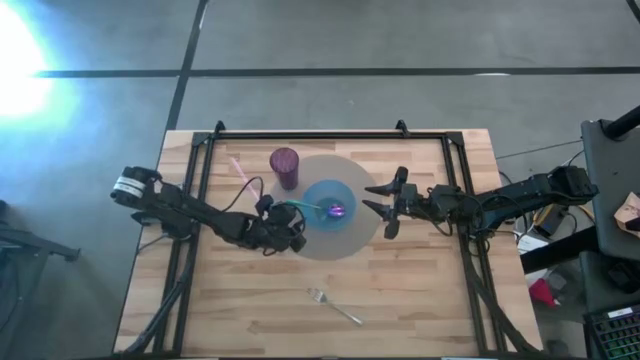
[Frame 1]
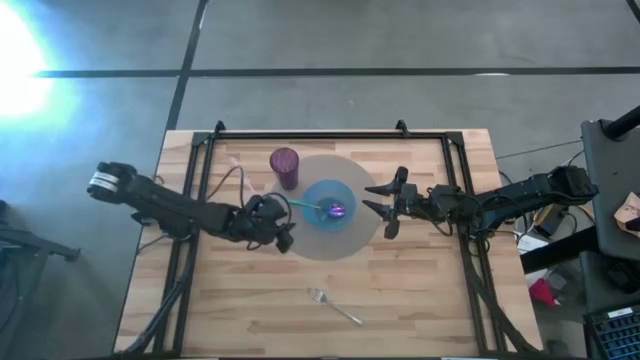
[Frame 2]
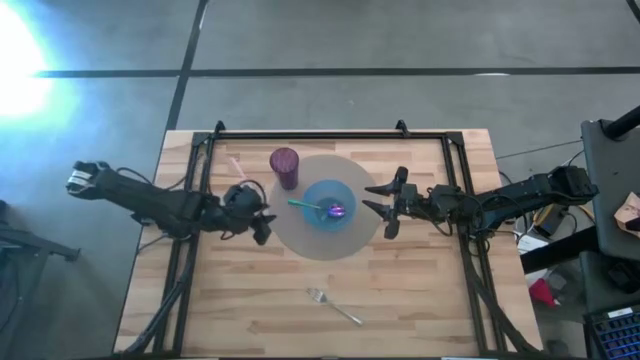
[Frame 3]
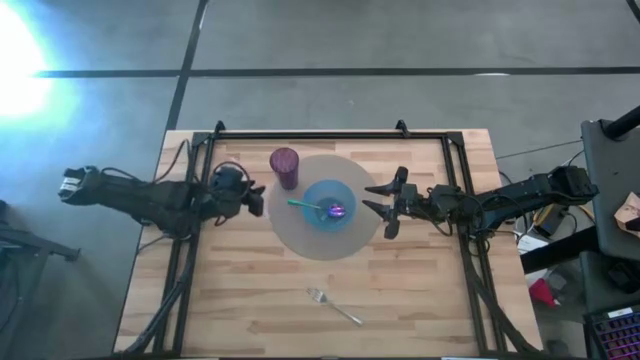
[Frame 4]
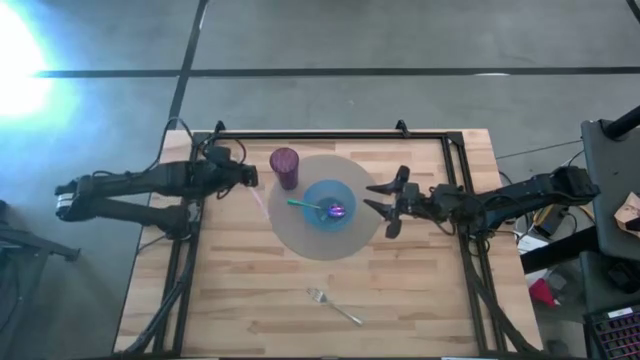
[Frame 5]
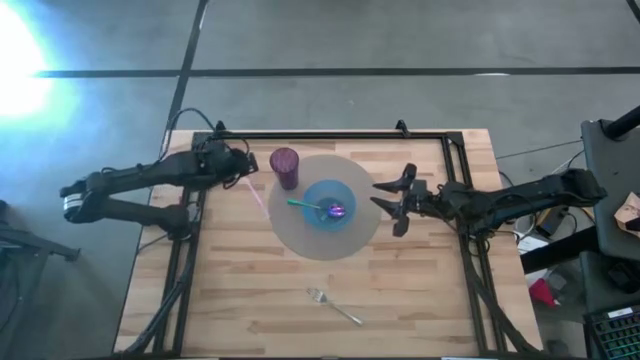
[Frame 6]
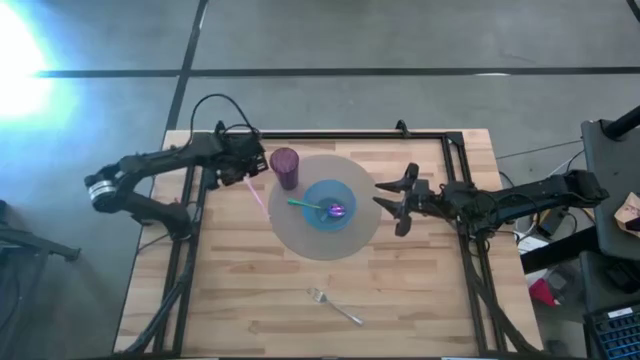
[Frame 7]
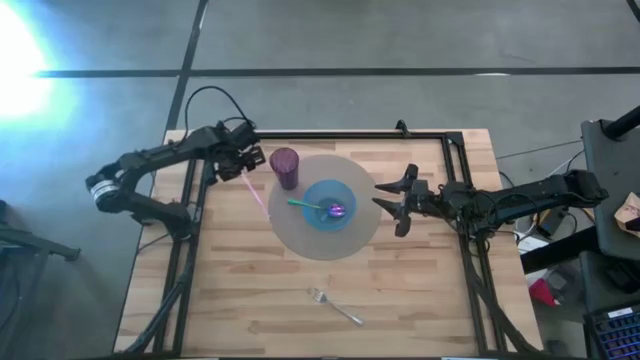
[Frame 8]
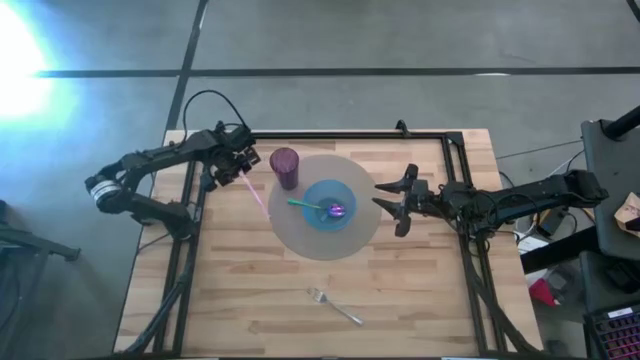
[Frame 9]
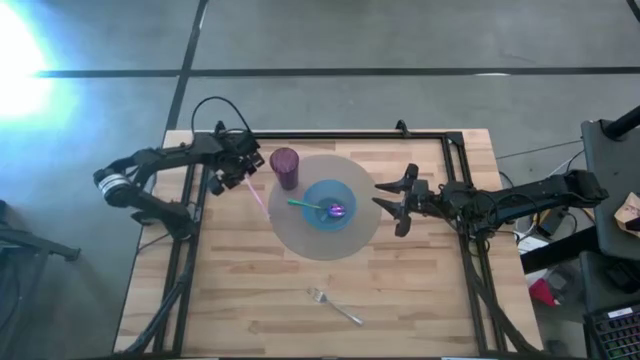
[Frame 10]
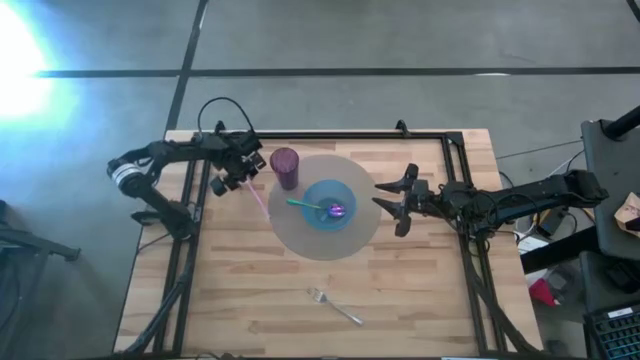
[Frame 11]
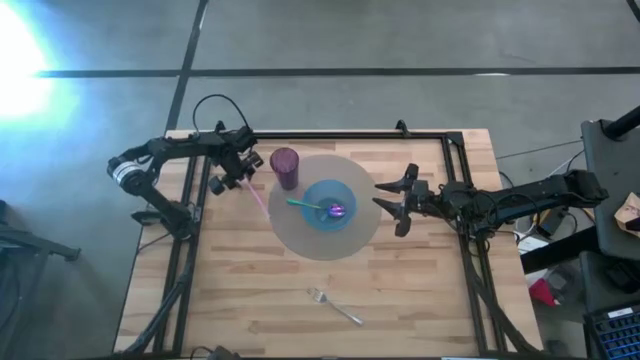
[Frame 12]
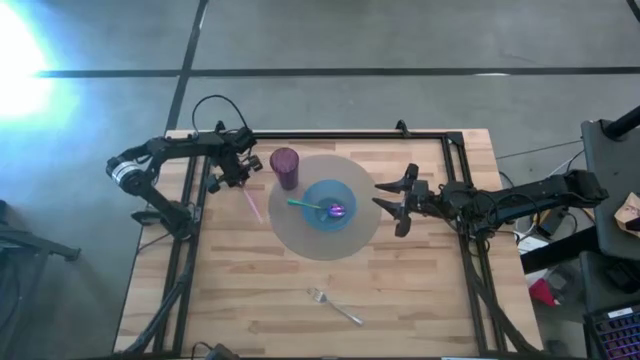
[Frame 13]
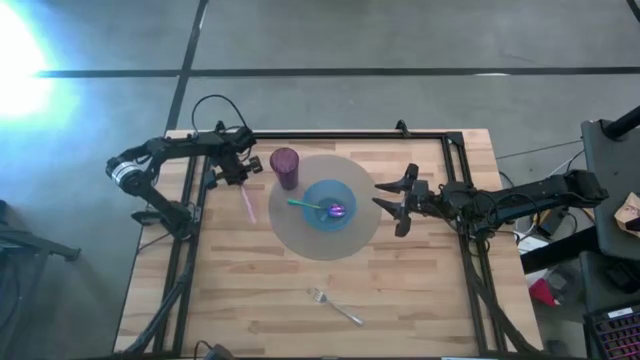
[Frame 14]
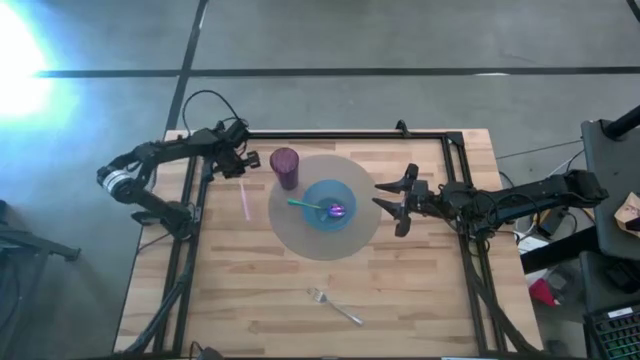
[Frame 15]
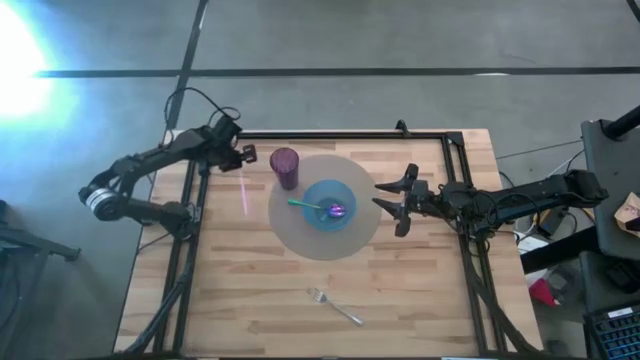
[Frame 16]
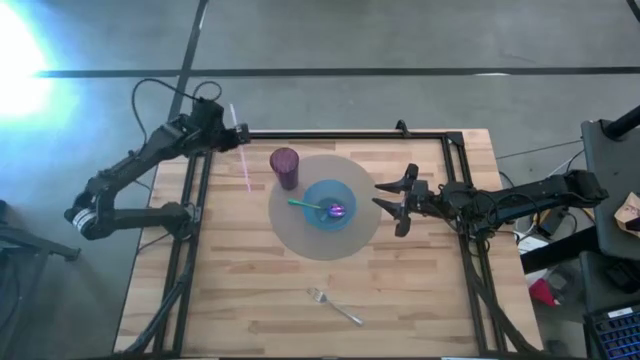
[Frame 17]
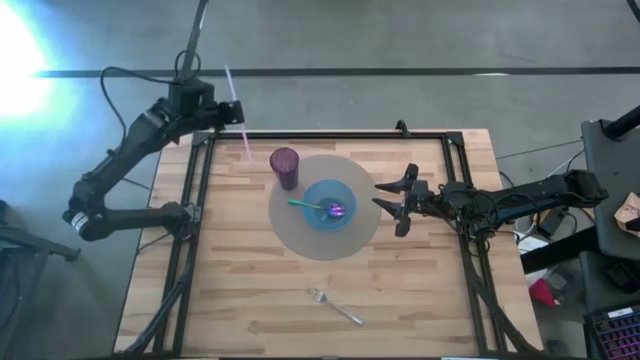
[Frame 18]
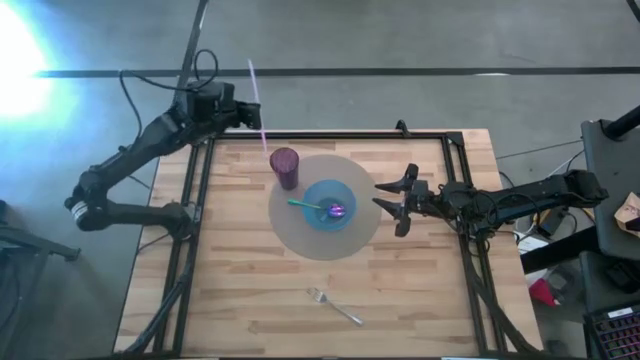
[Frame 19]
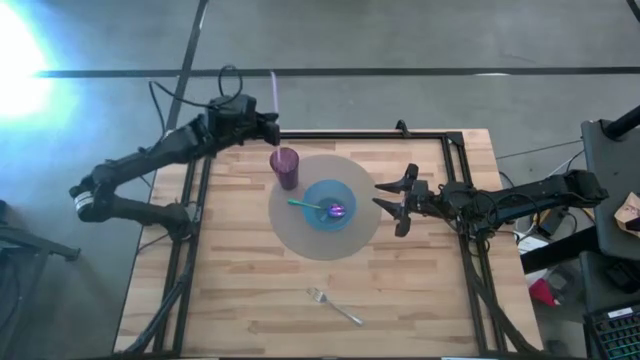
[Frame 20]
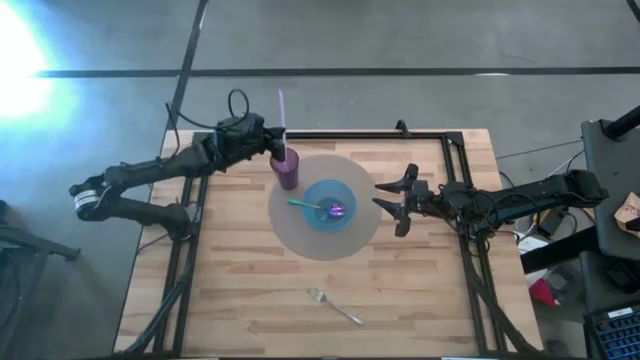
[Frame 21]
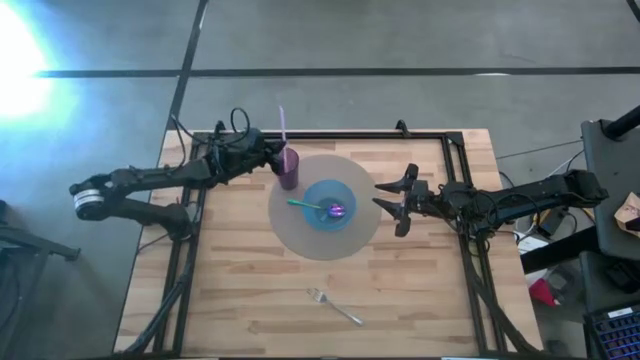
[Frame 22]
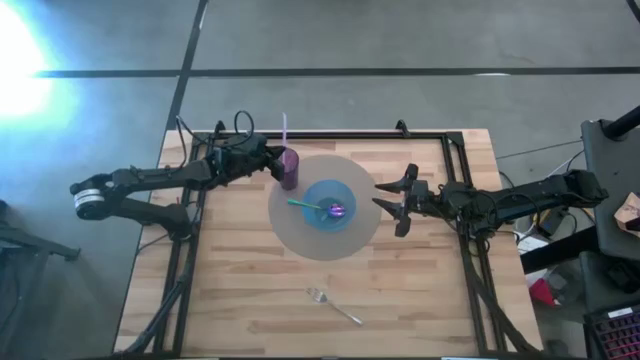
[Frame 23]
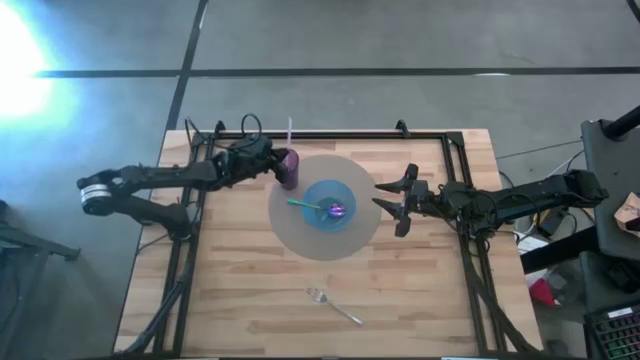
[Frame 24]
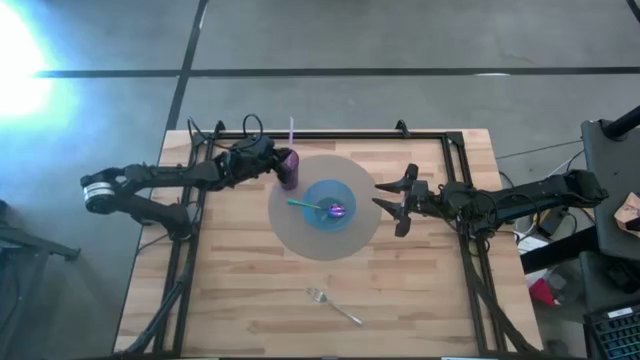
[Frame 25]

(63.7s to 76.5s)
Task: Pick & Place Utensil
Put the violet straw into the violet cup on the gray mat

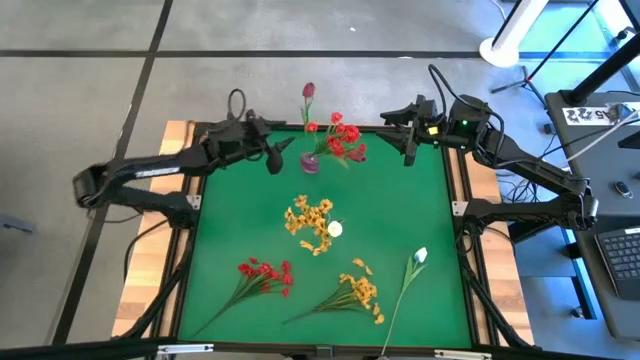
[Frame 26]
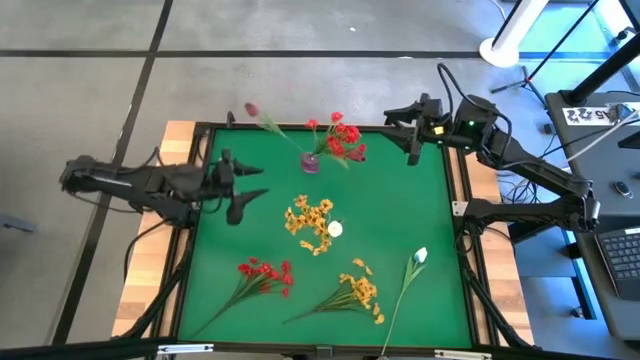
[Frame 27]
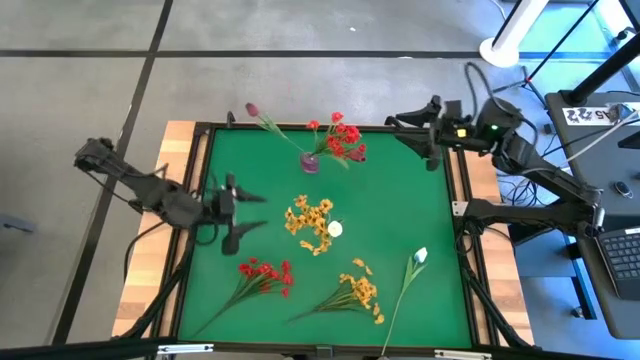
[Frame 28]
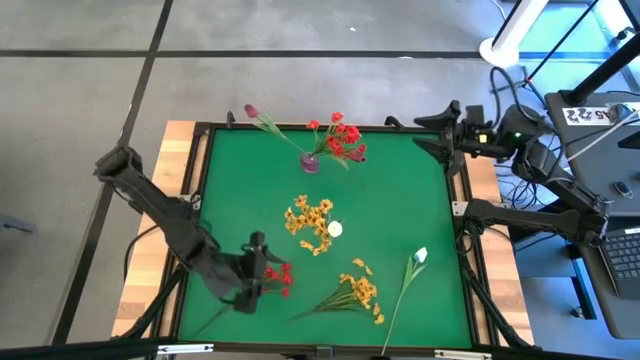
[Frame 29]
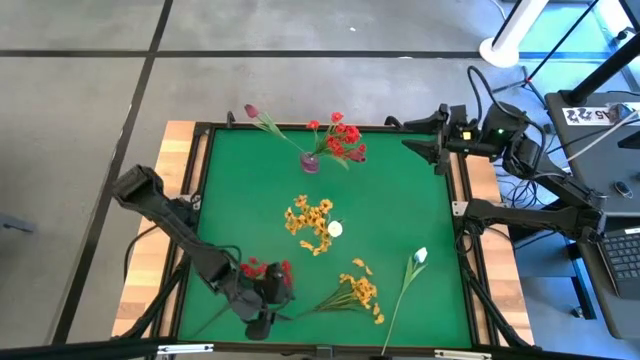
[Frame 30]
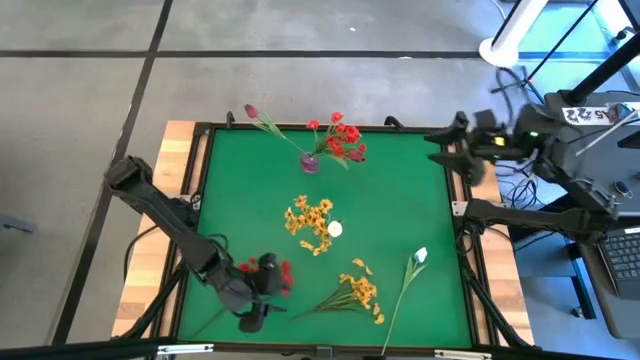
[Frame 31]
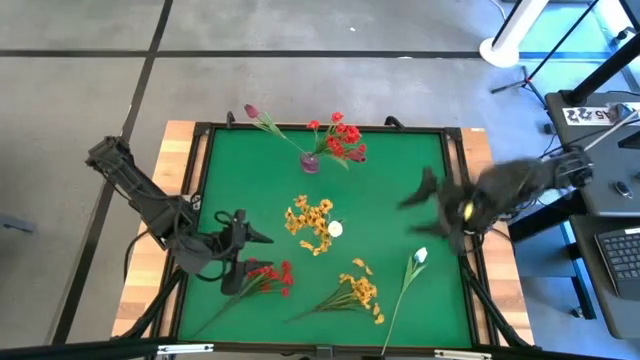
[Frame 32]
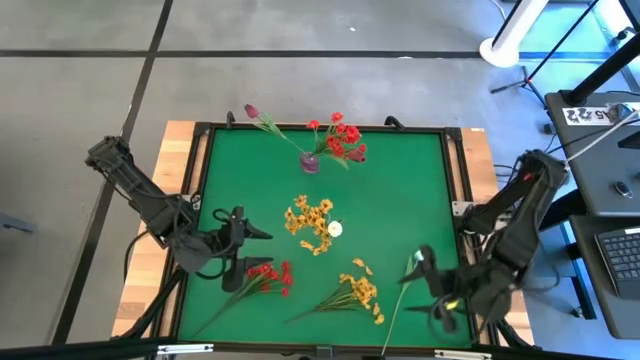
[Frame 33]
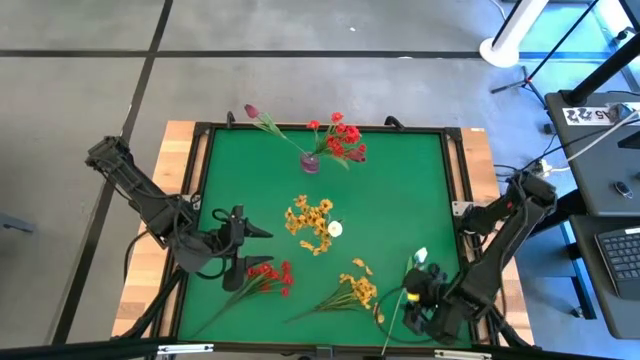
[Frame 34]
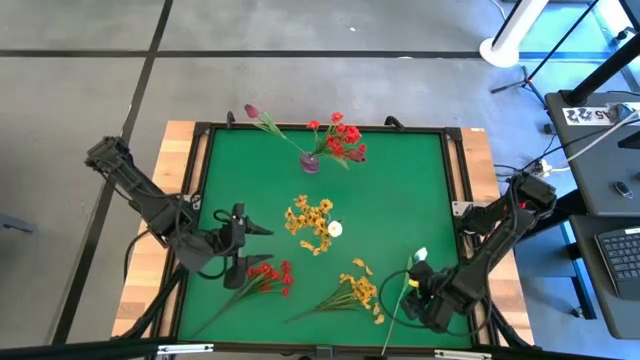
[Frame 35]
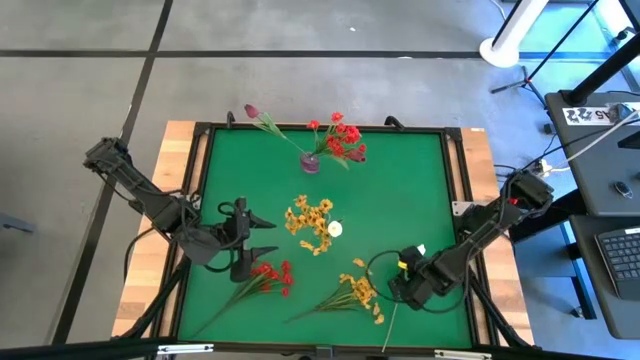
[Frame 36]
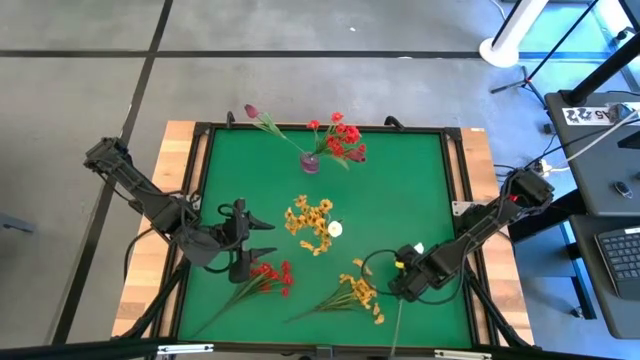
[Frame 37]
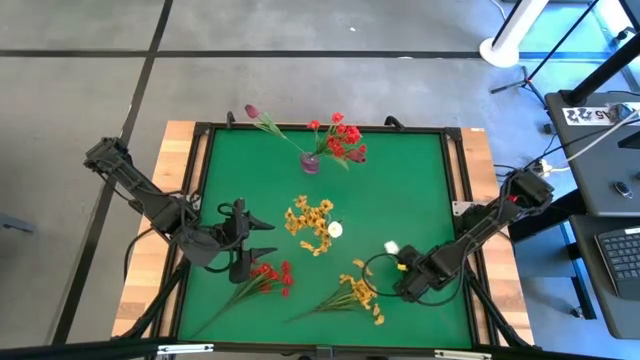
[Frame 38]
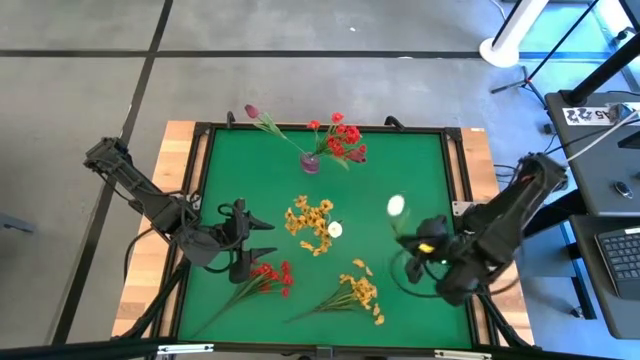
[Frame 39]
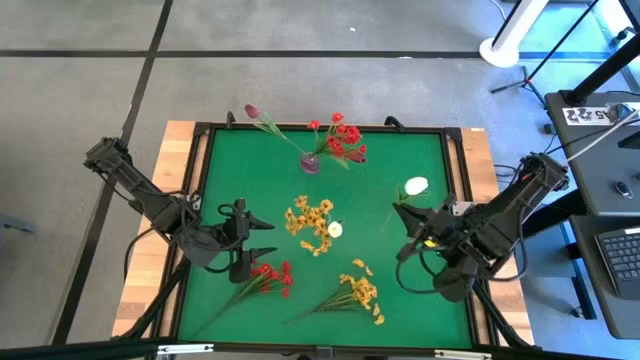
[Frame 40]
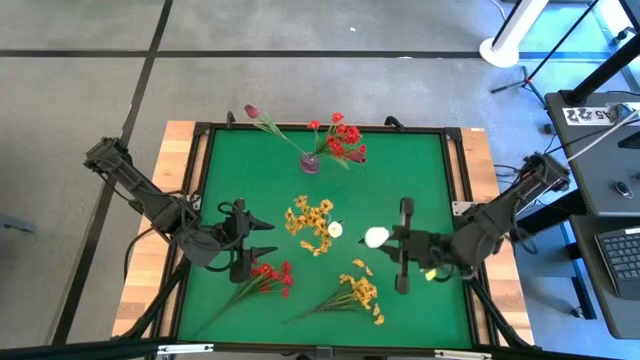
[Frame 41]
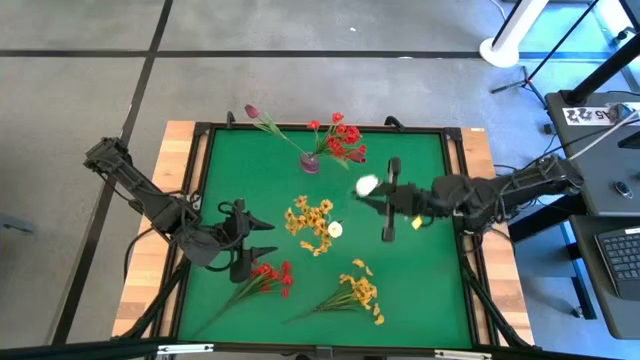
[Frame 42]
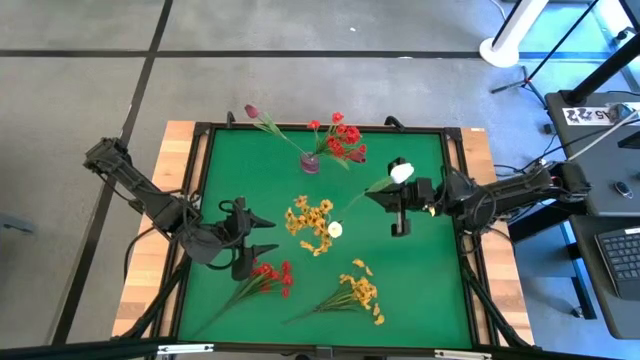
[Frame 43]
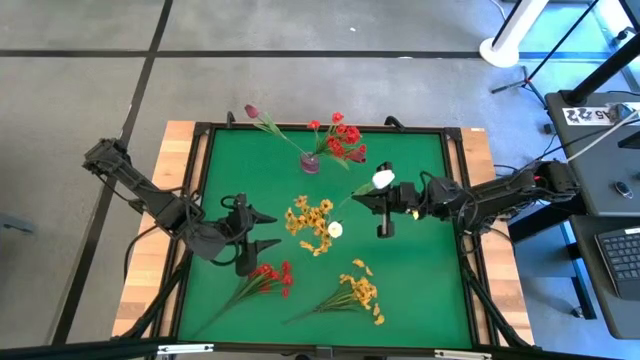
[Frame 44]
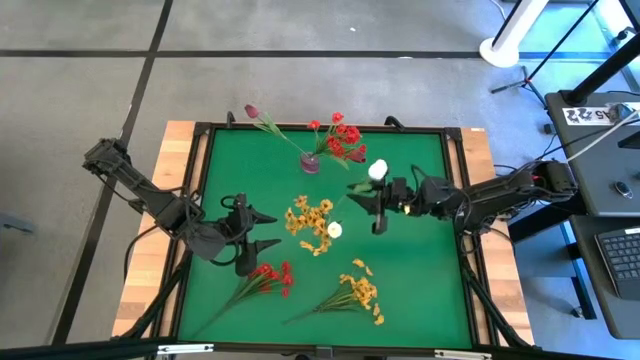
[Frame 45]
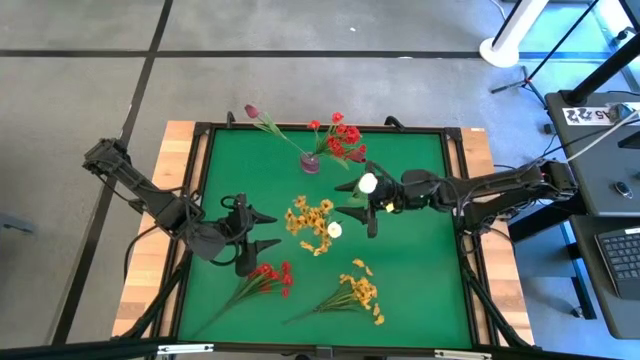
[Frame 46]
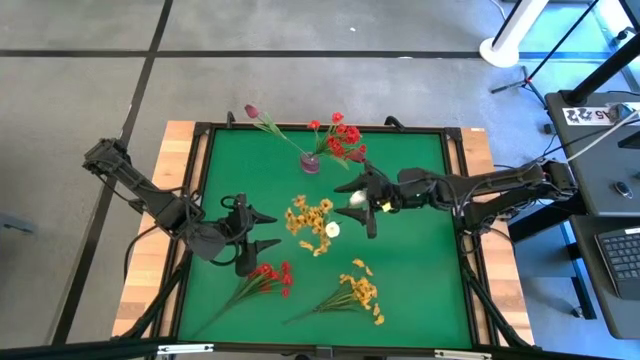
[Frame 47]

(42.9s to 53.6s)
Task: Sort flowers into vase by color
Put the white flower into the transparent vase
